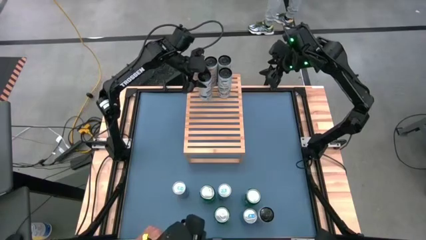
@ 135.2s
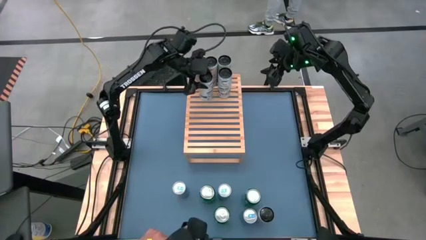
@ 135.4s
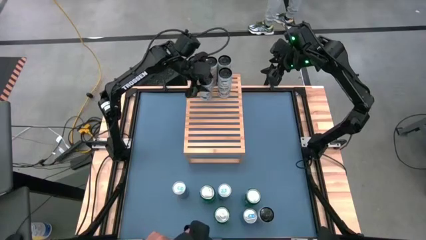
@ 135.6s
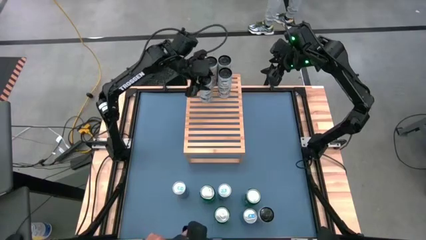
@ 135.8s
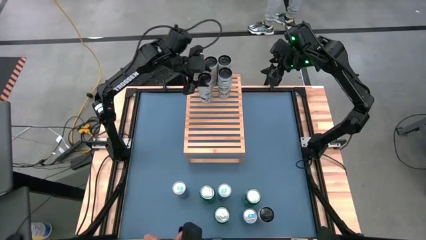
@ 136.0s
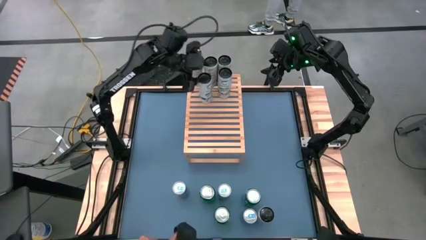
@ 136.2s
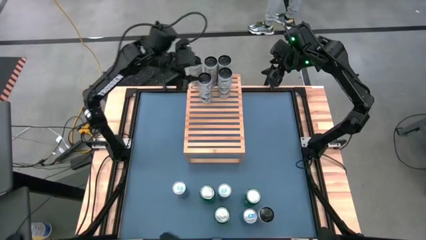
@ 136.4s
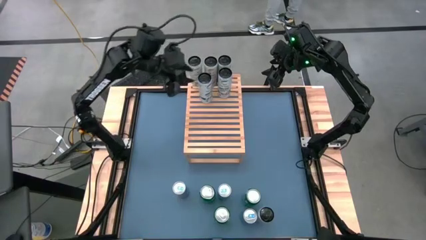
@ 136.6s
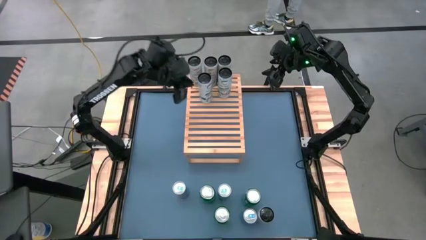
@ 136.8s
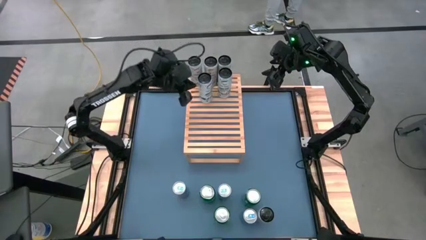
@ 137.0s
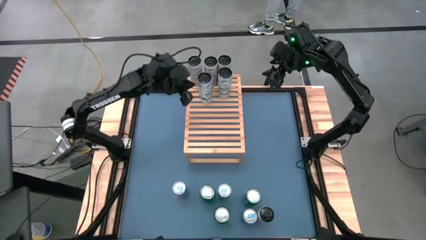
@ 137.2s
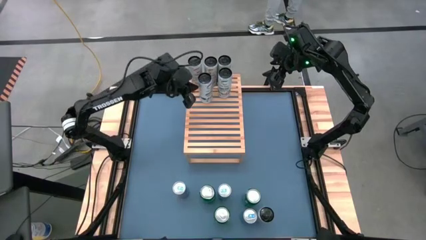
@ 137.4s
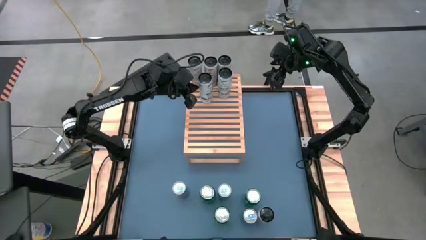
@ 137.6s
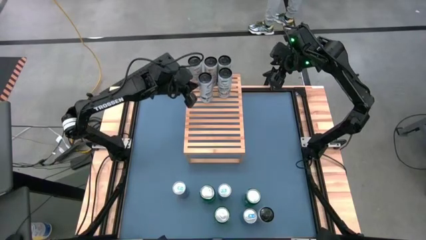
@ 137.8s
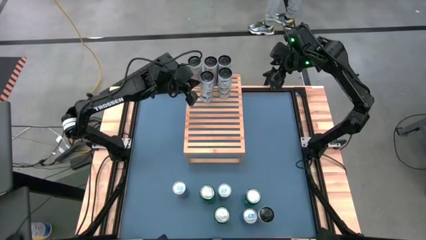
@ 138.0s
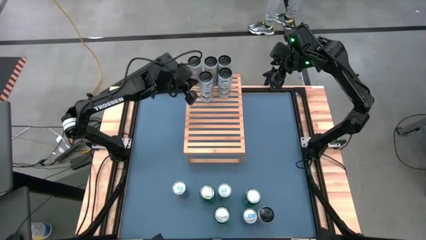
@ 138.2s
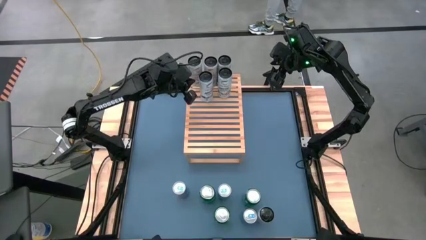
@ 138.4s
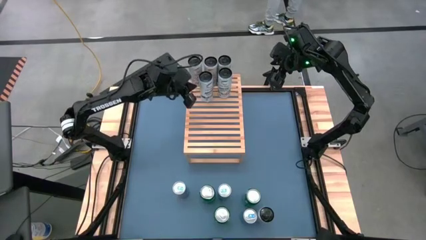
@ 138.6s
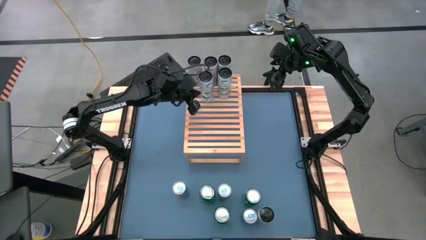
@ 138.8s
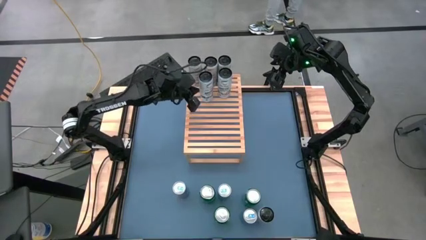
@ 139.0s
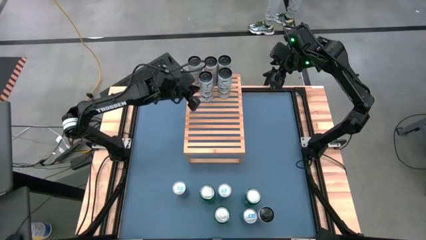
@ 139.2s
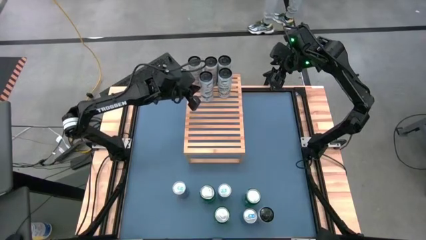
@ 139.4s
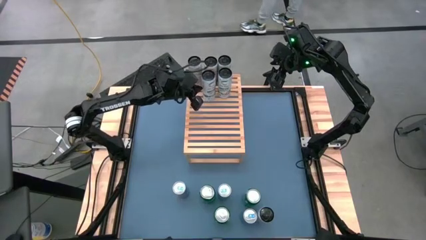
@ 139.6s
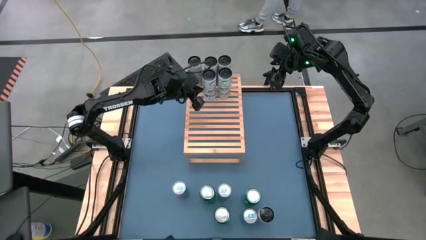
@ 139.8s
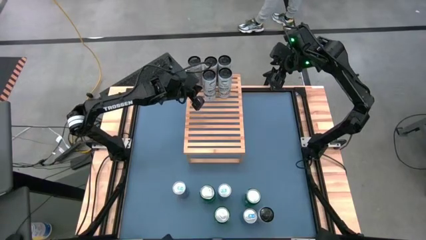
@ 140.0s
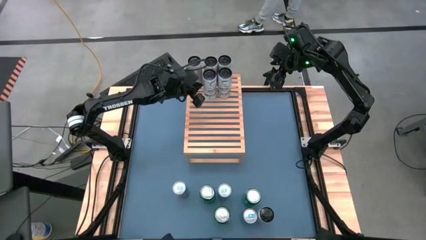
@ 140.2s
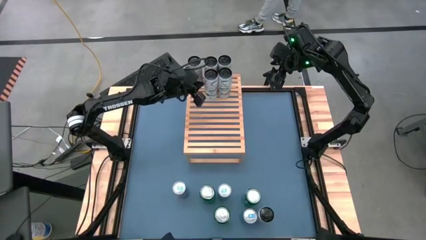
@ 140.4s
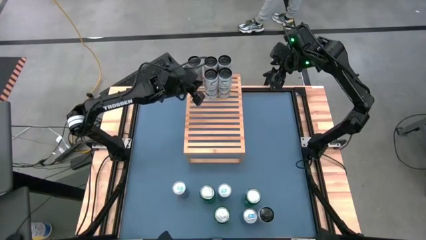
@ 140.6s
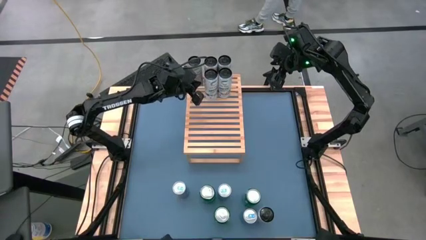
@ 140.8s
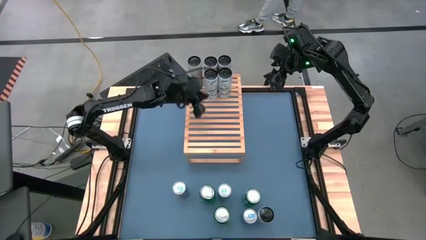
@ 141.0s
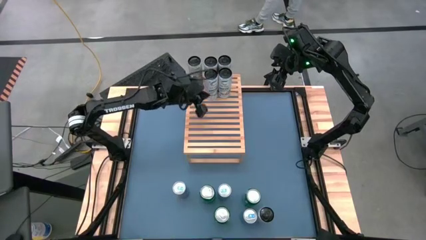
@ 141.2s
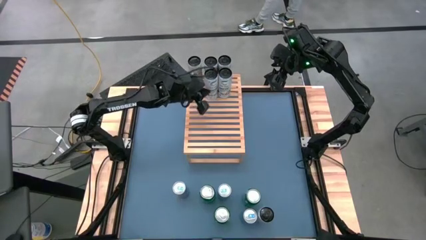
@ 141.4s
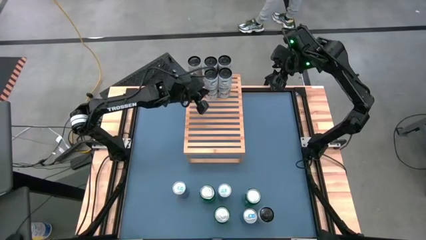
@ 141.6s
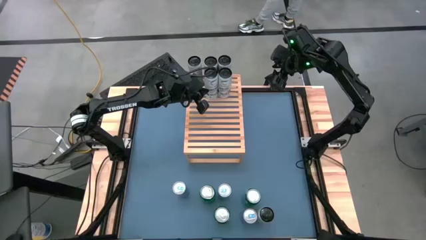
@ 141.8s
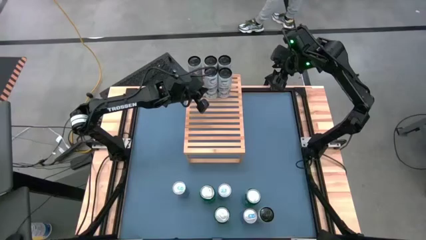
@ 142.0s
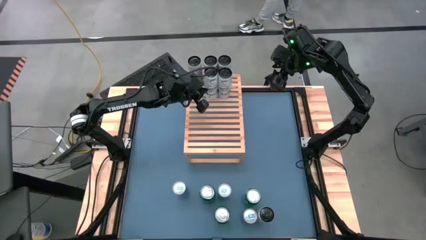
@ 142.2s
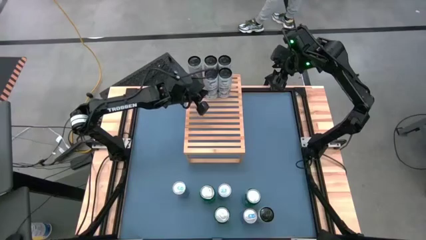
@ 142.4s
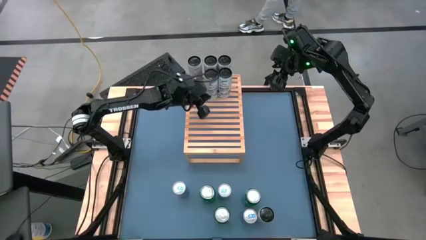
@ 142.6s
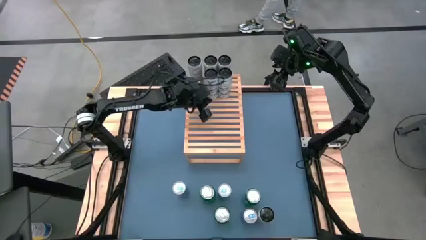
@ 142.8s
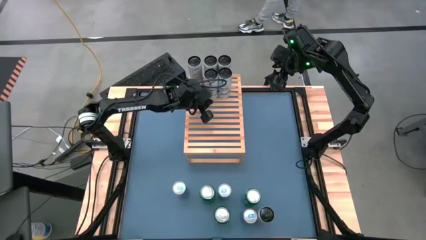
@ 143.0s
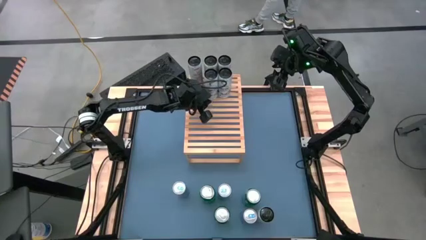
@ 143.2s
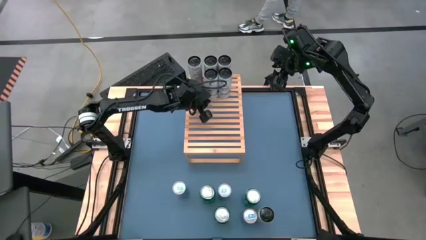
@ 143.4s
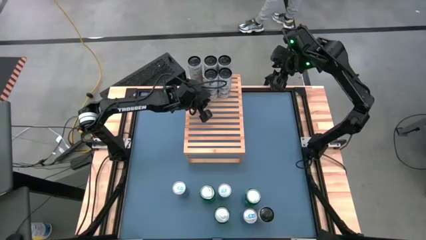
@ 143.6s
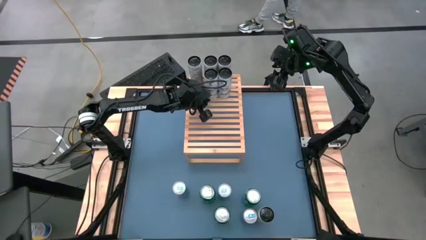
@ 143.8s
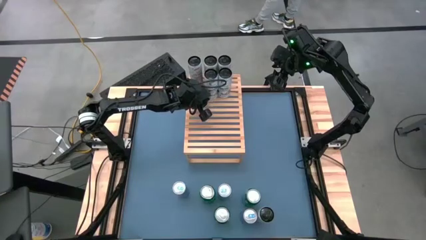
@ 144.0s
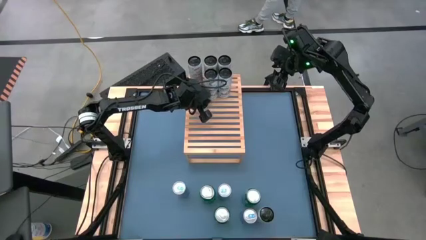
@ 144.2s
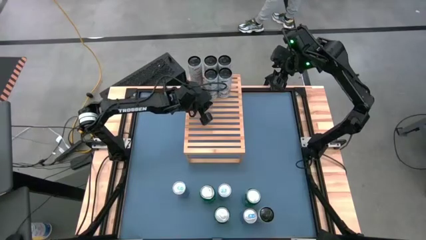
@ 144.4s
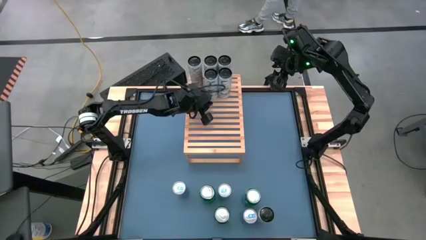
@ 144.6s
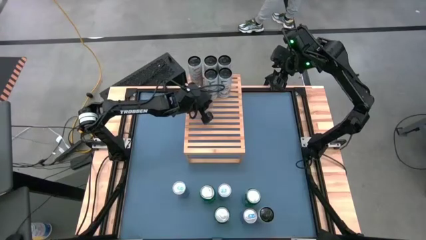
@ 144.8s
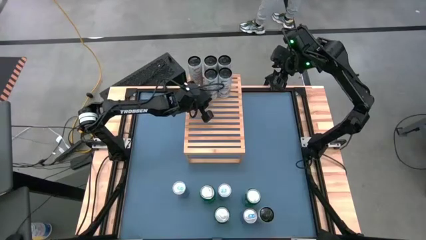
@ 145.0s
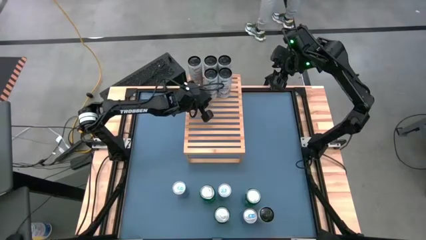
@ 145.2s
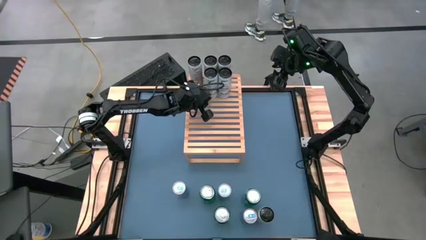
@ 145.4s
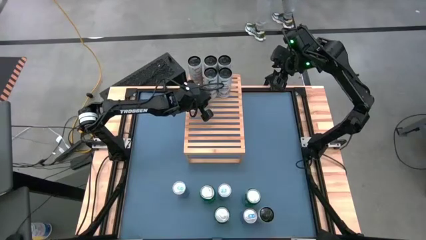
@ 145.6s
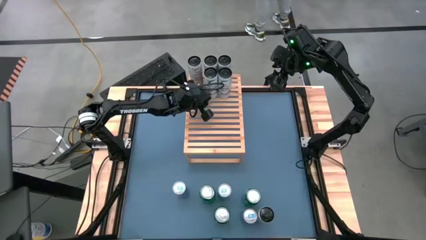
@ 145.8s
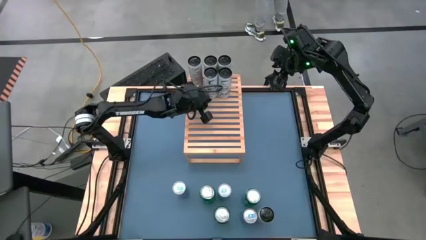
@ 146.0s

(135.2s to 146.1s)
Task: Place canned beverage on shelf
Put the white blue soda can on the shelf aligned with the other white blue soda can
